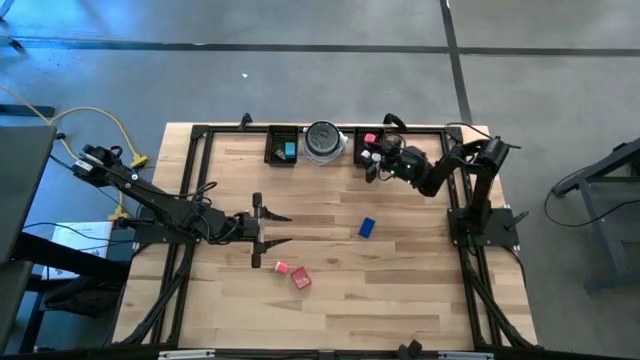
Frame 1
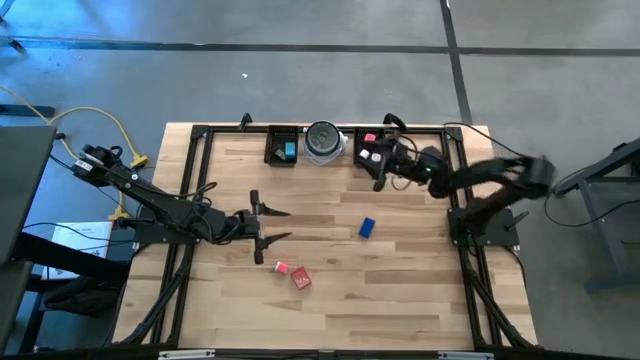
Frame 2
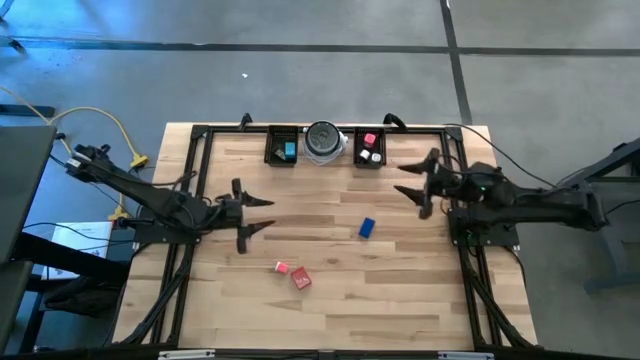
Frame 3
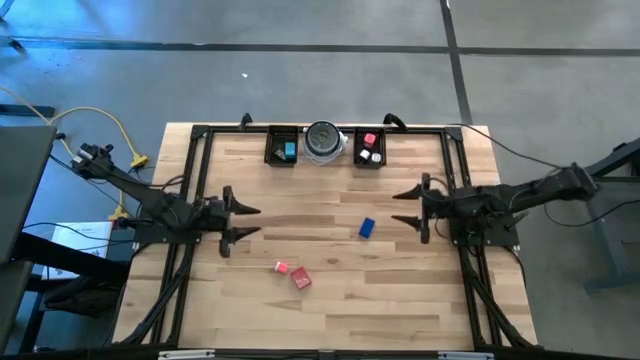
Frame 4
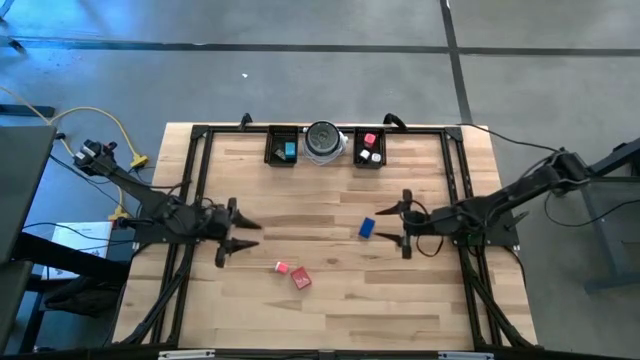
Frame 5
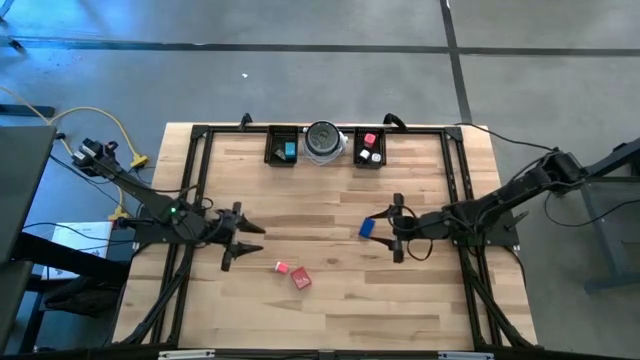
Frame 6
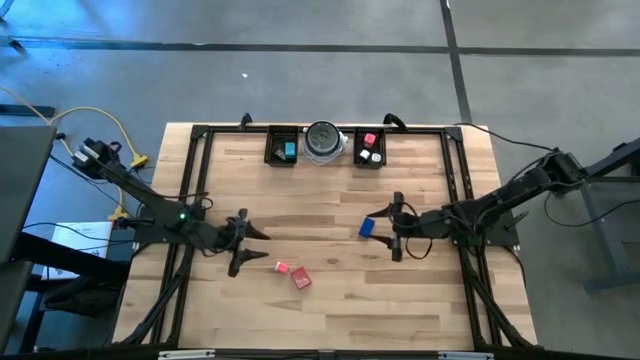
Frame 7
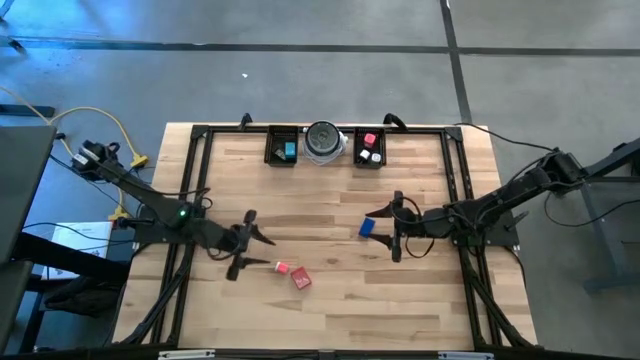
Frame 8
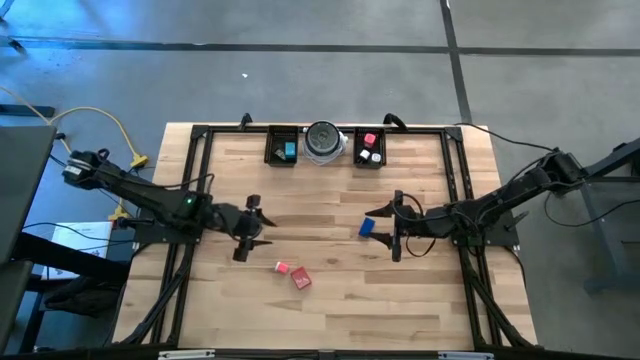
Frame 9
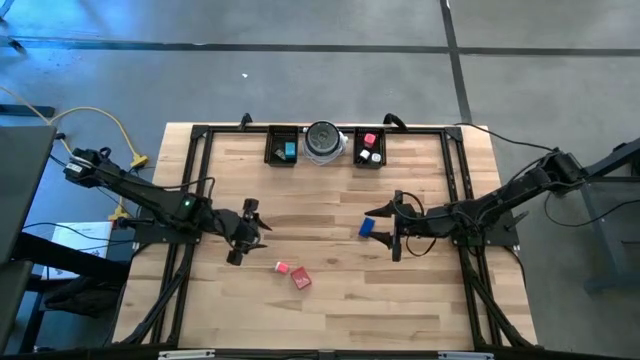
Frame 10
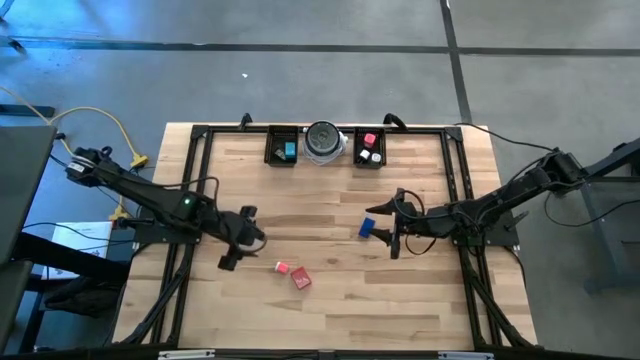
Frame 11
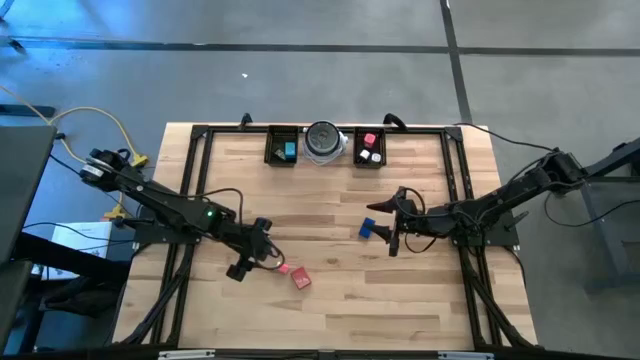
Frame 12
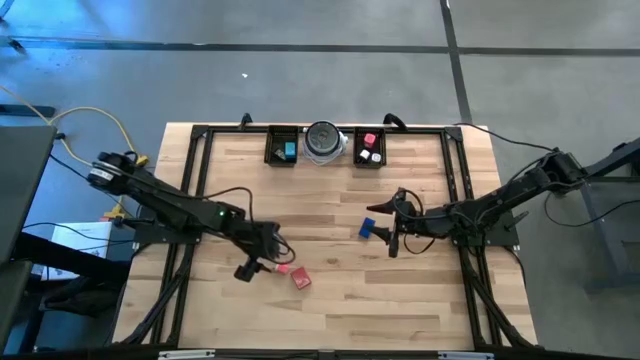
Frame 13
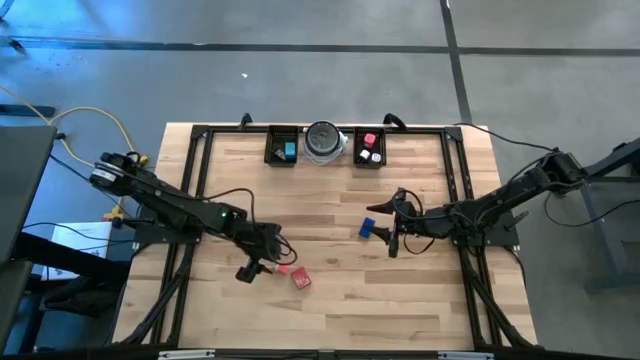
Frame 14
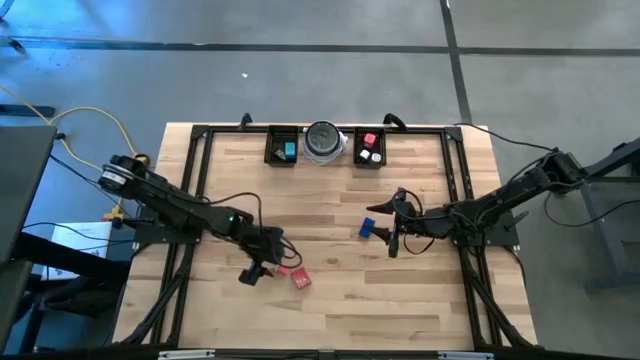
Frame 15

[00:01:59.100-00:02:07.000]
Task: Pick & Place Office items
Put the pink white charger adapter into the right black basket

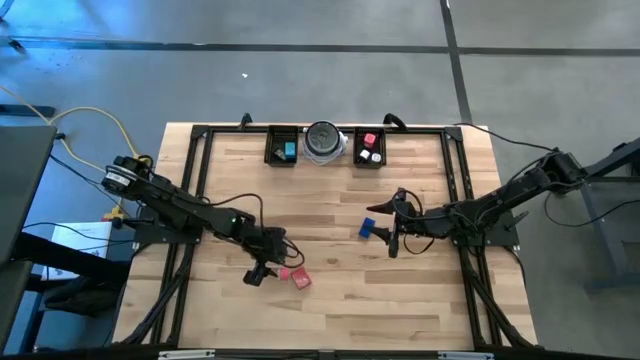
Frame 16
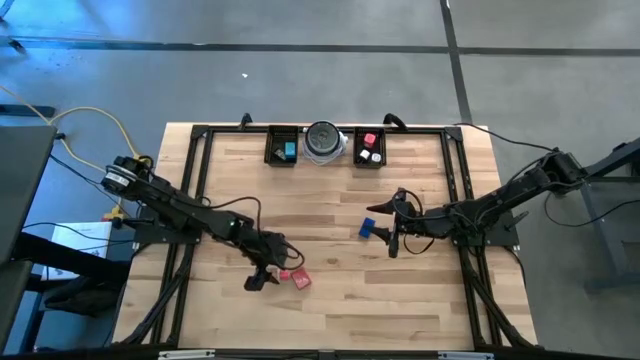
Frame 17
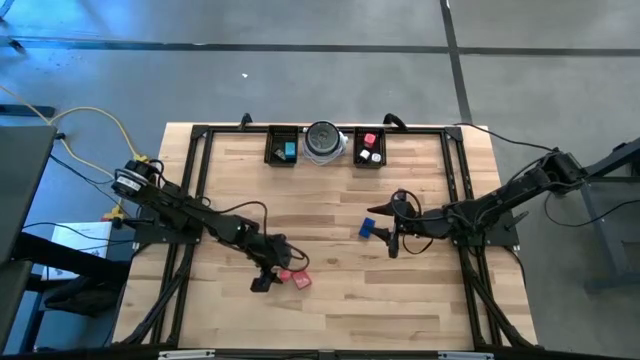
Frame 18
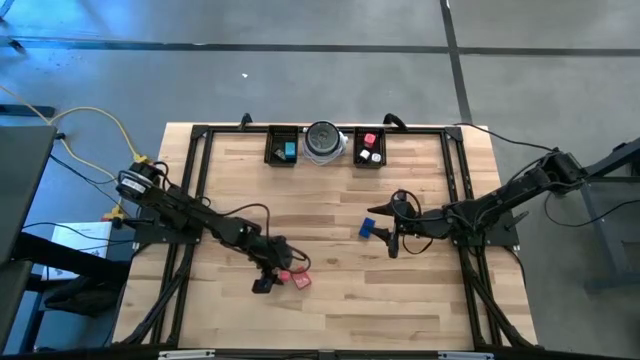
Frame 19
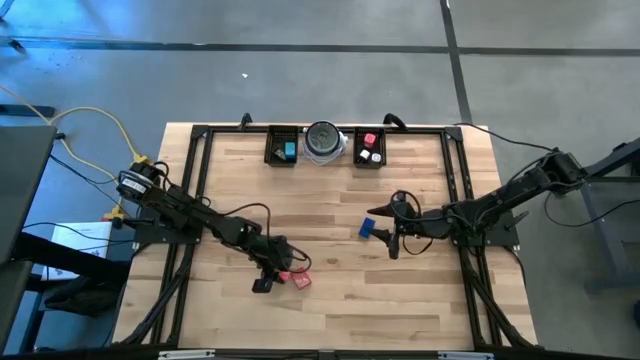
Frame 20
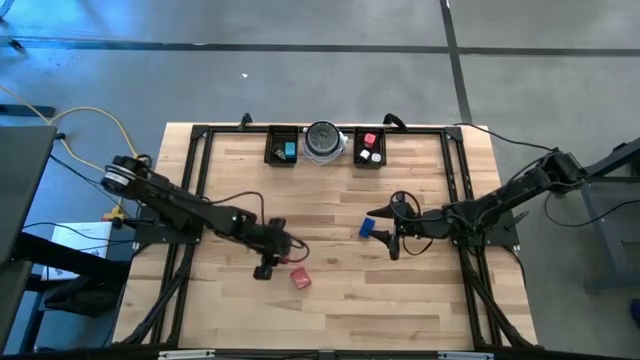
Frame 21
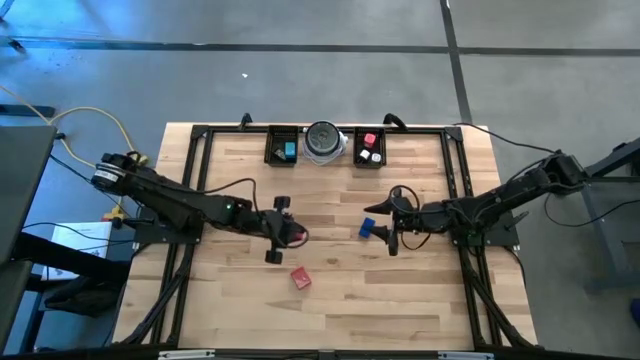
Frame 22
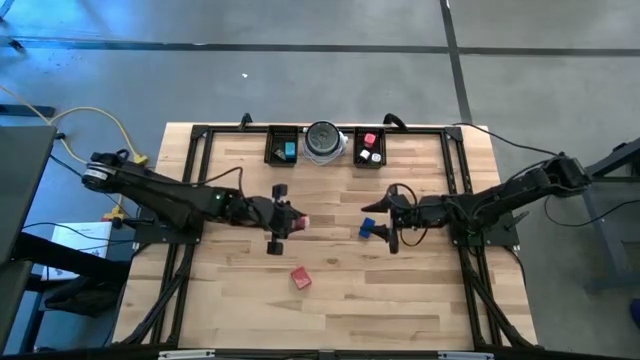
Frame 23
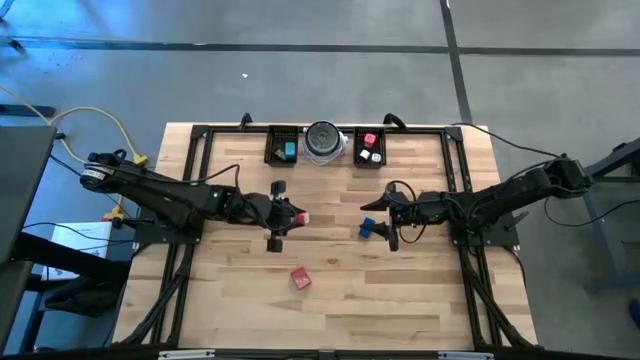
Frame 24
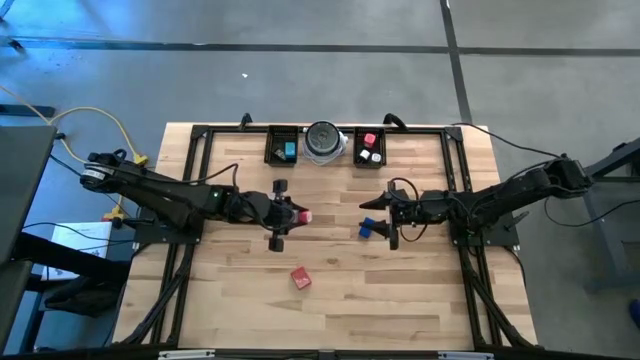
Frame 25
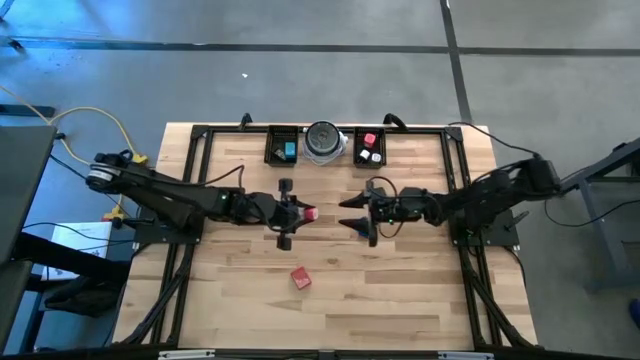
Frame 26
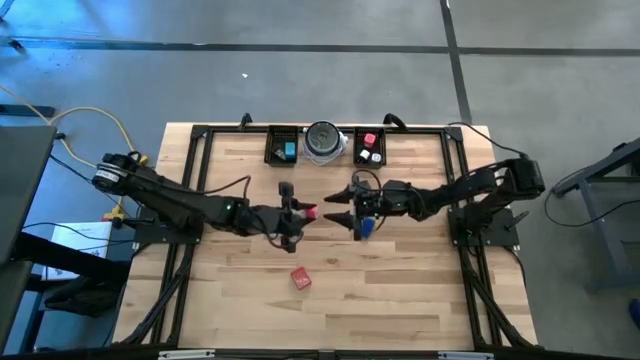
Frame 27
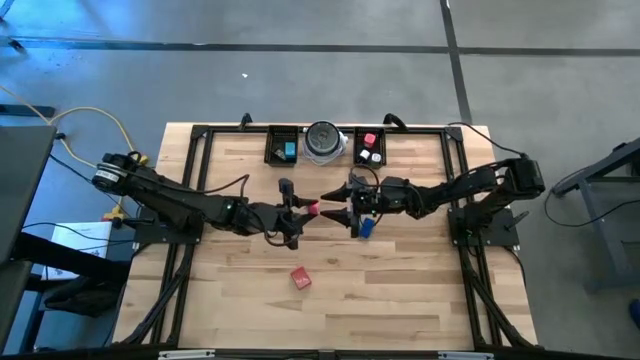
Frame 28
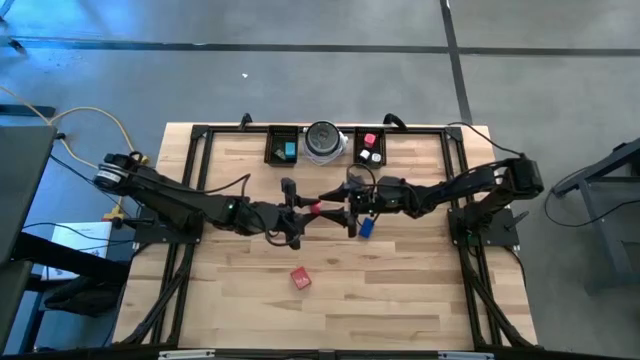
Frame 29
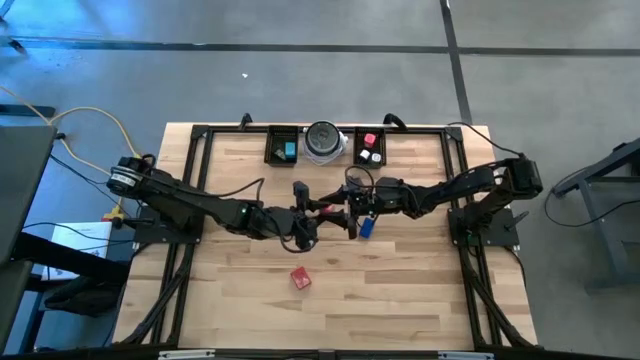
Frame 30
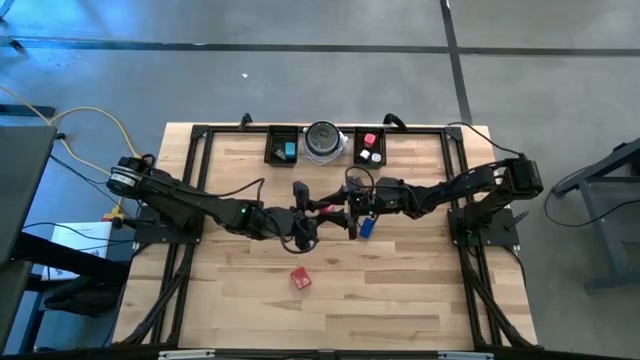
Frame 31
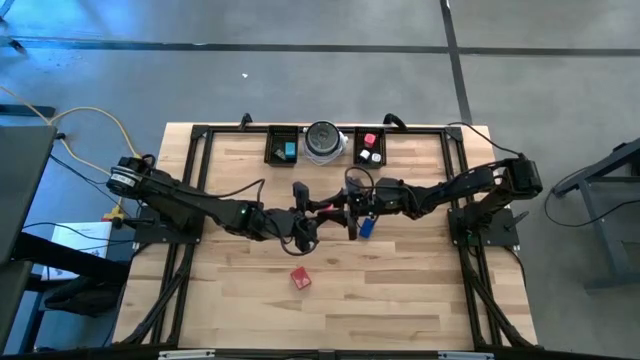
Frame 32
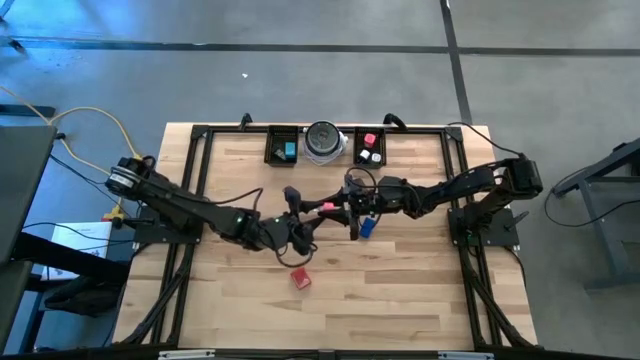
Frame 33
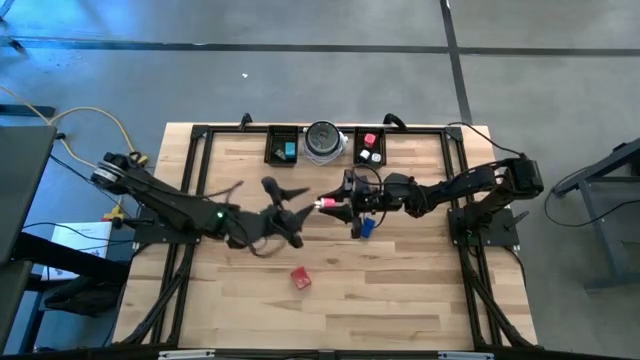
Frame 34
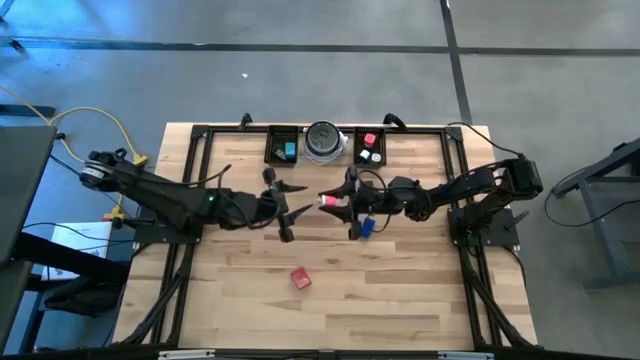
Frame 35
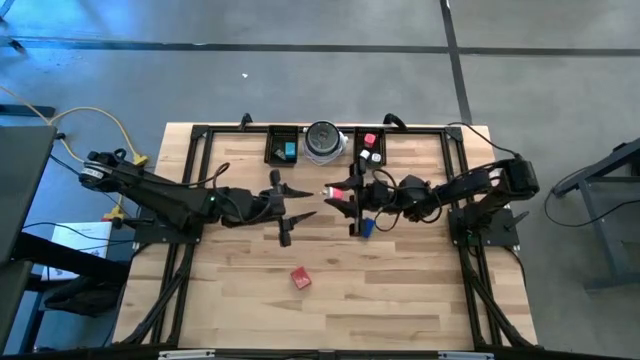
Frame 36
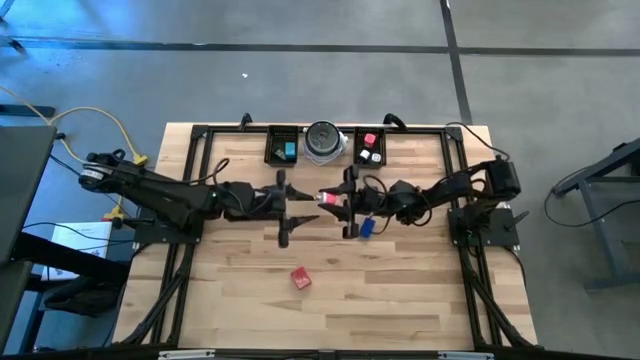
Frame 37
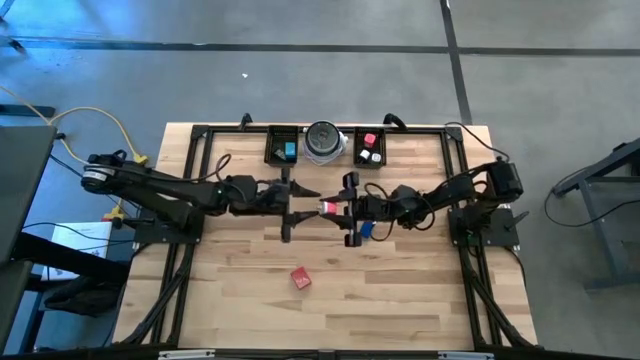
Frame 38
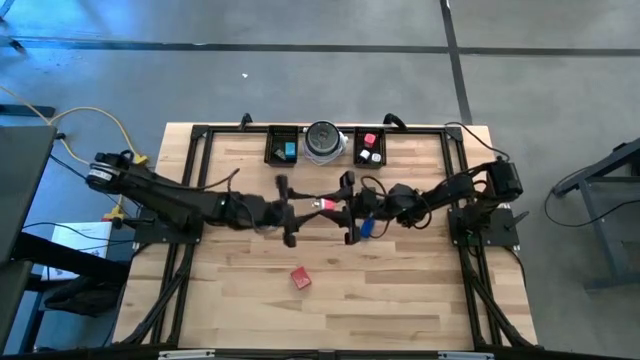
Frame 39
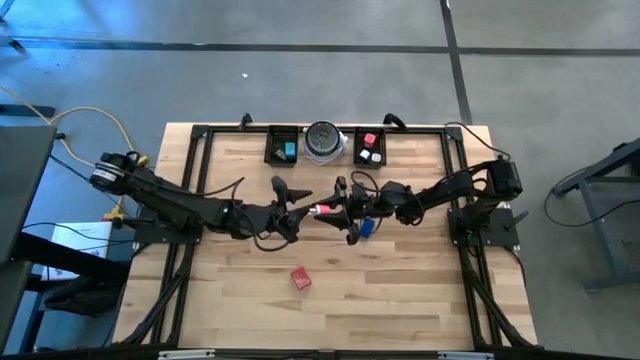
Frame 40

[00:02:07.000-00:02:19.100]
Put the pink white charger adapter into the right black basket

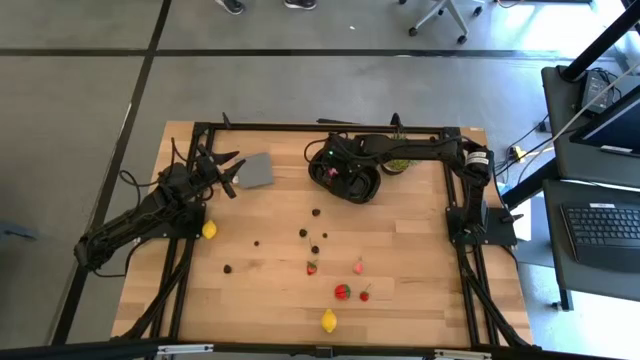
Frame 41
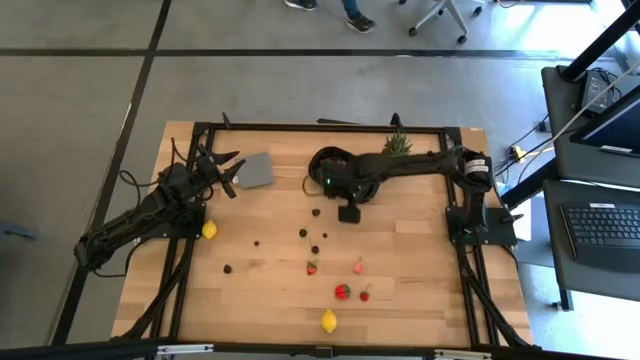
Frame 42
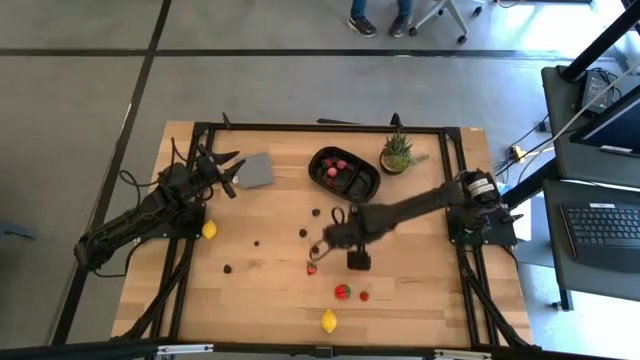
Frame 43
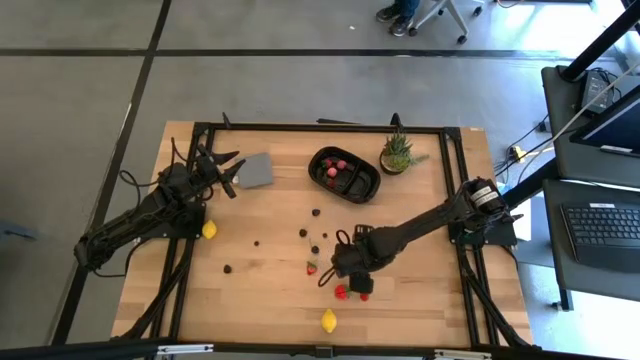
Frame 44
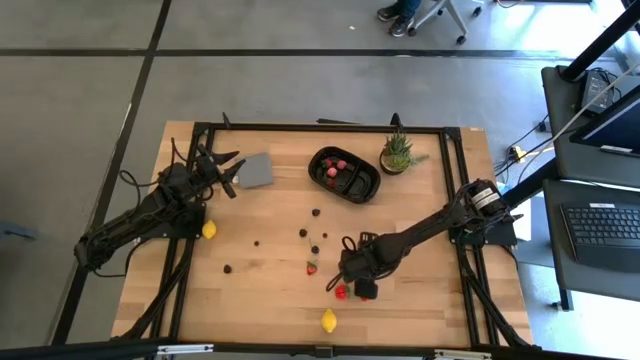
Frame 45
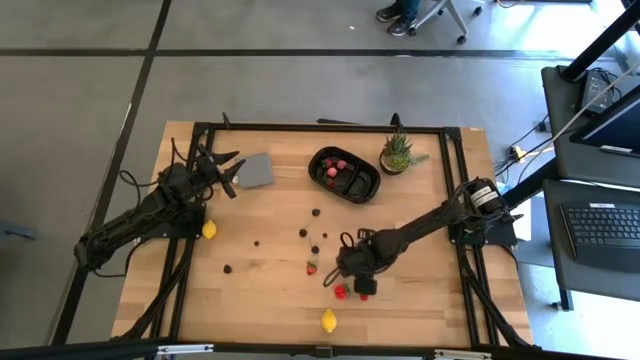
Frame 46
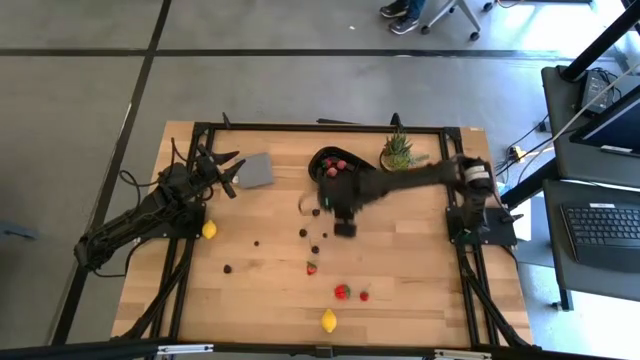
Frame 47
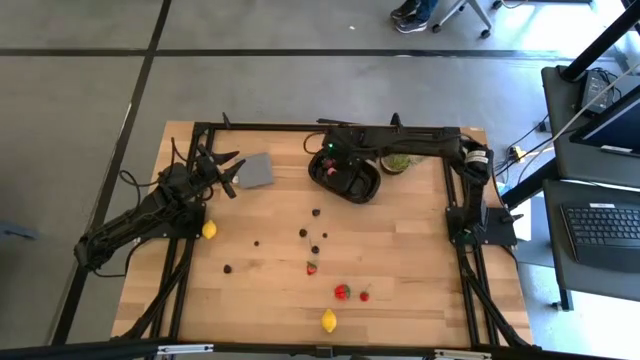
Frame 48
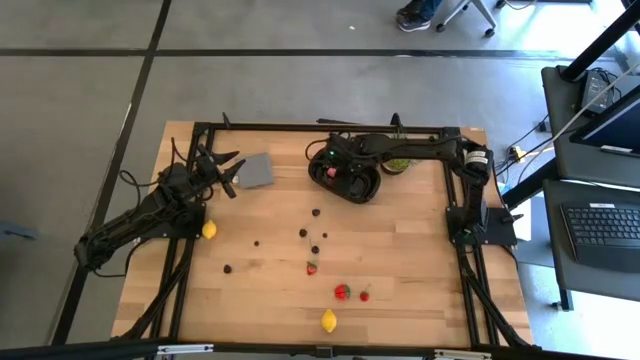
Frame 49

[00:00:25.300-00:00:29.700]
Task: Pick and placing Produce into tupperware
Put the apricot into the black bin
